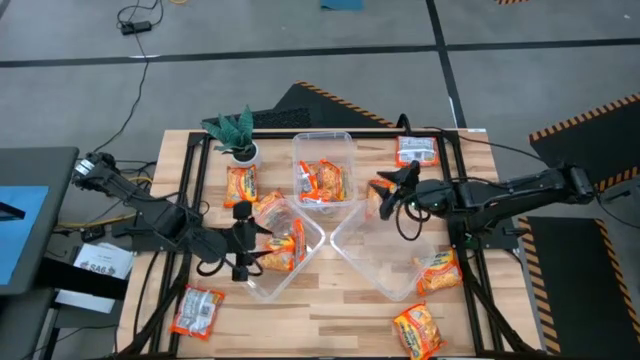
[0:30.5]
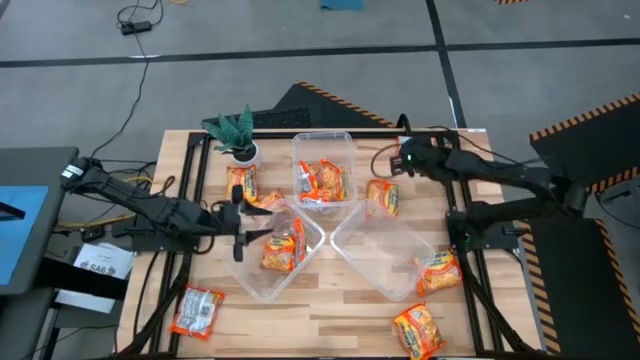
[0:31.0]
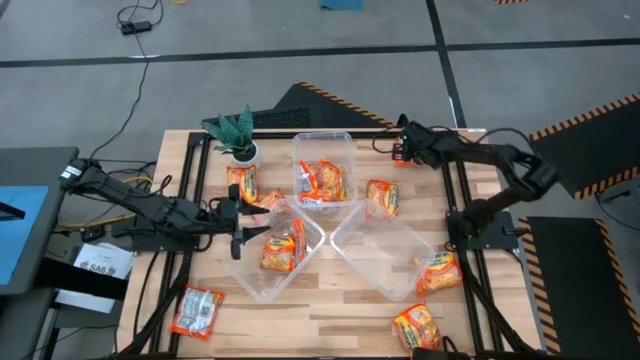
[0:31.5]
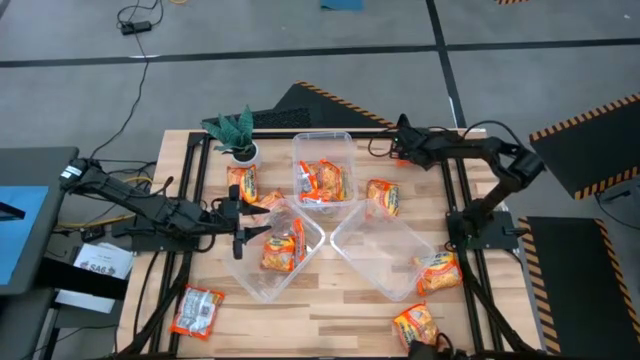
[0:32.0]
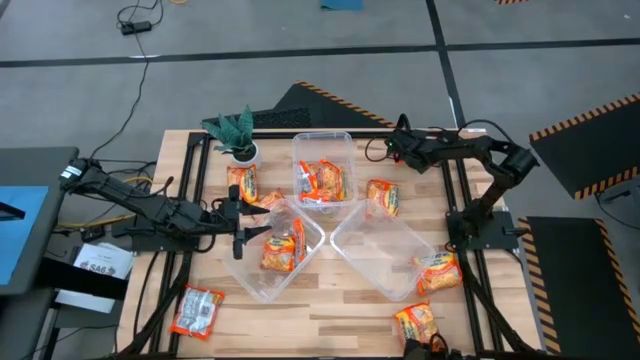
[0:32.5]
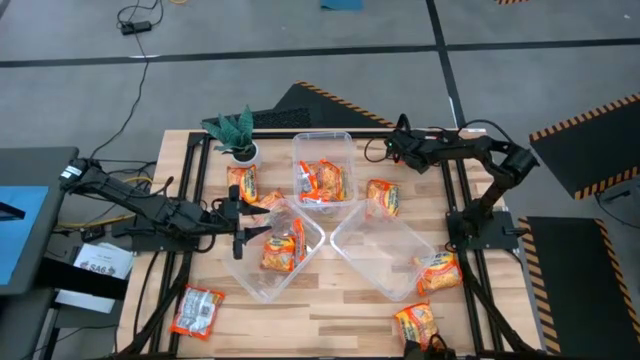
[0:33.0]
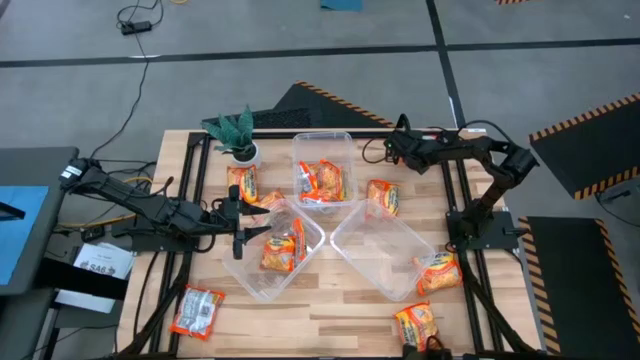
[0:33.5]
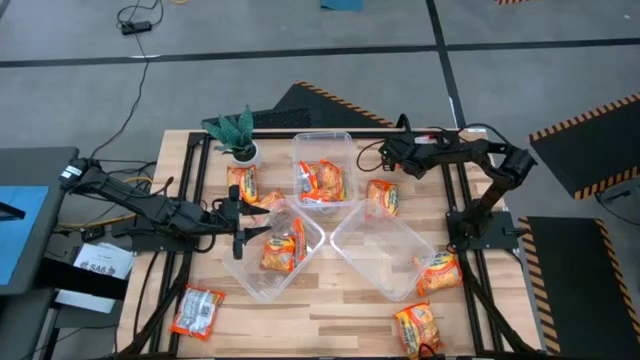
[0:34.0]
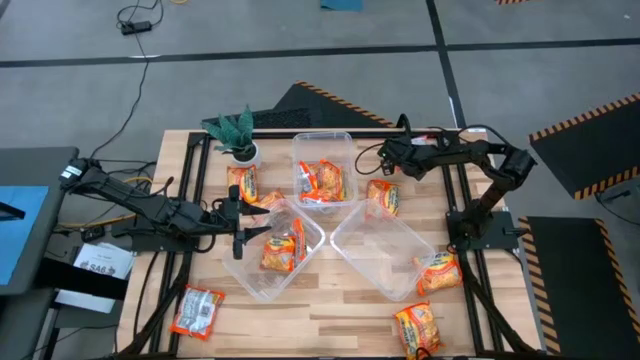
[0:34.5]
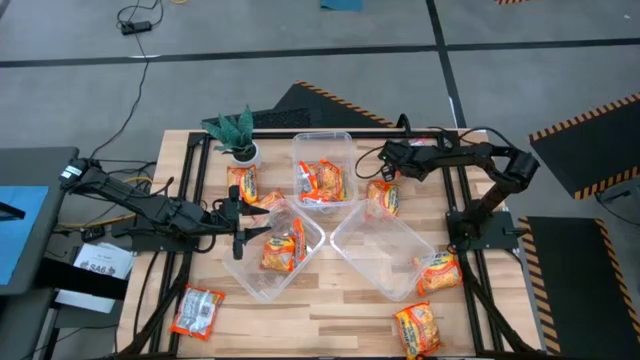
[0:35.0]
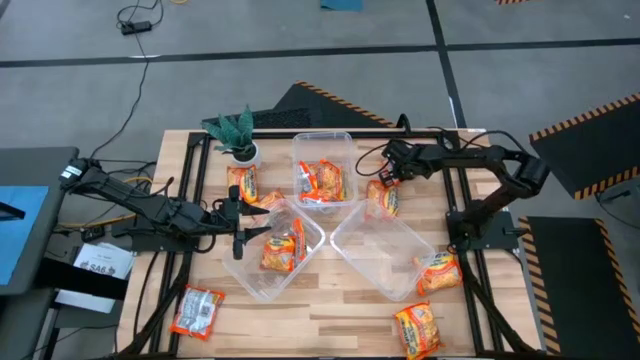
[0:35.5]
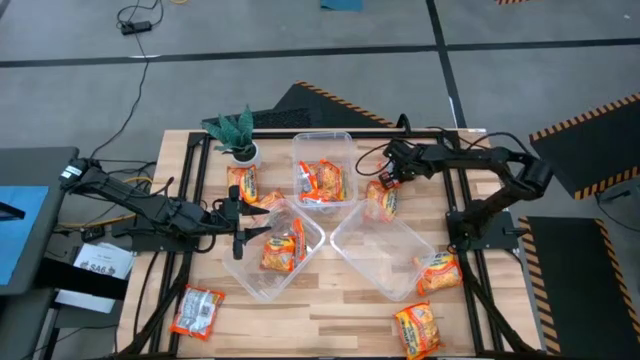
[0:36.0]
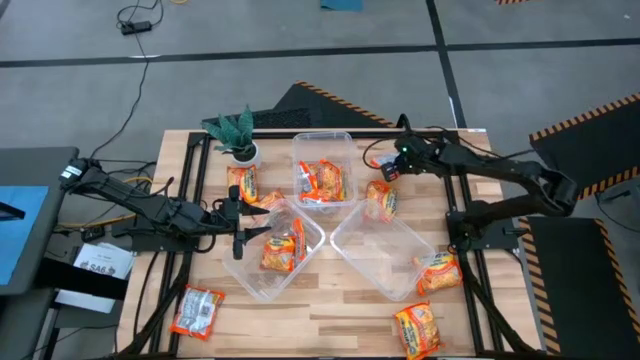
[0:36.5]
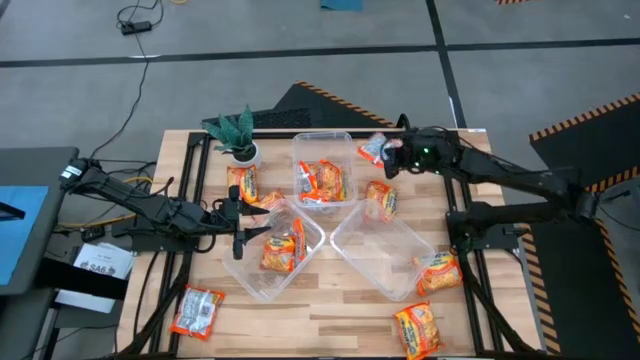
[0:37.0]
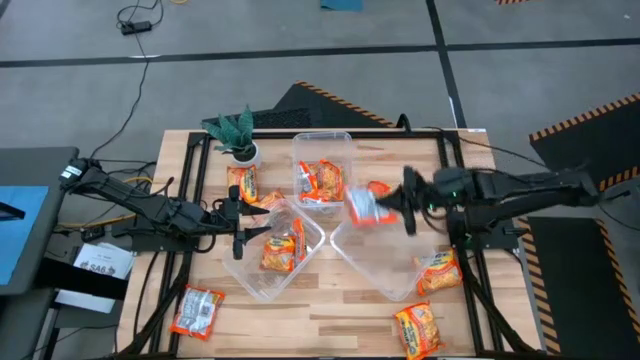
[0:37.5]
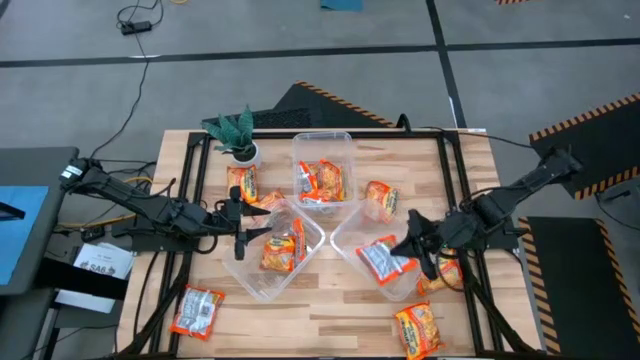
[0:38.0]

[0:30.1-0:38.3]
Task: Sort Maruchan noodles
Put the orange noodle pack into the bottom right transparent container

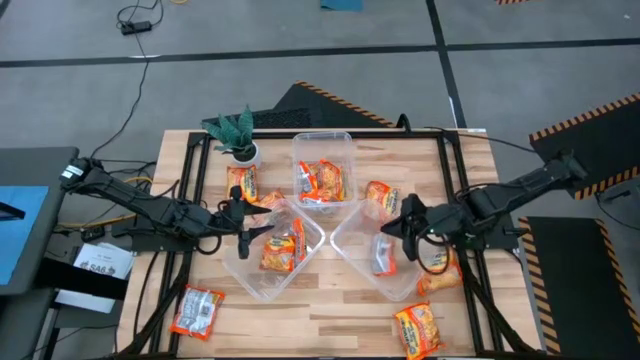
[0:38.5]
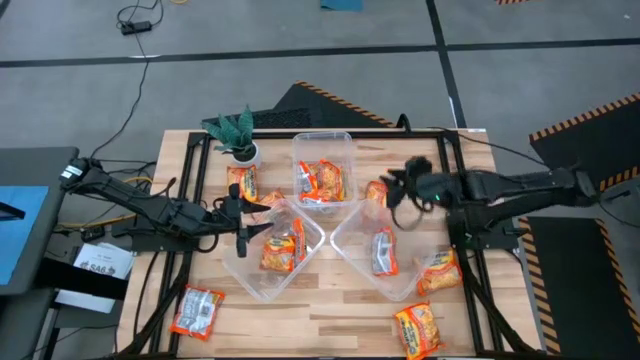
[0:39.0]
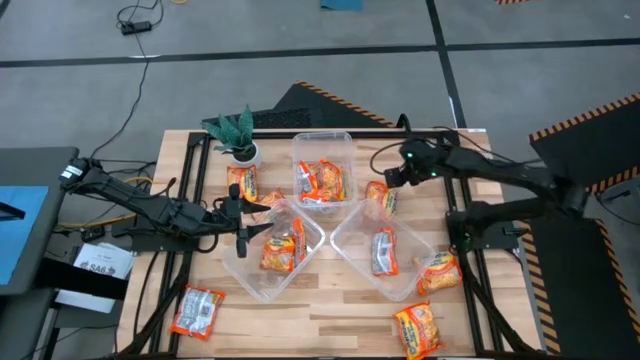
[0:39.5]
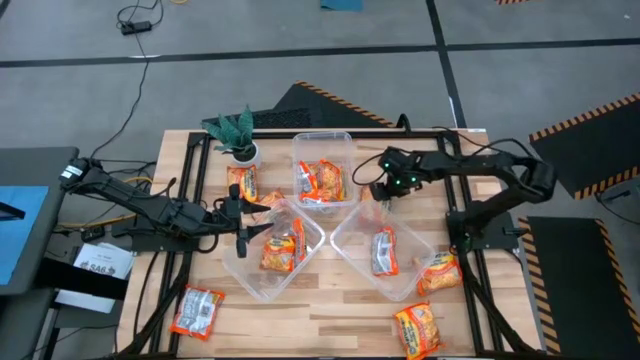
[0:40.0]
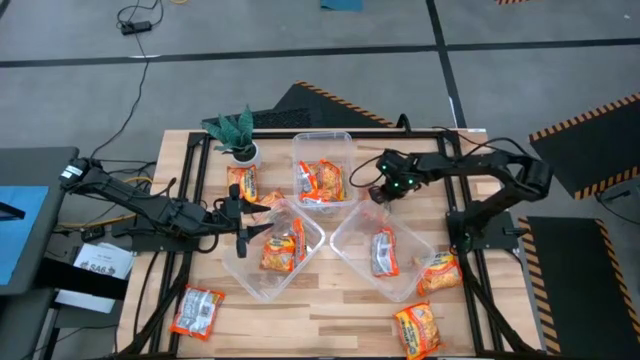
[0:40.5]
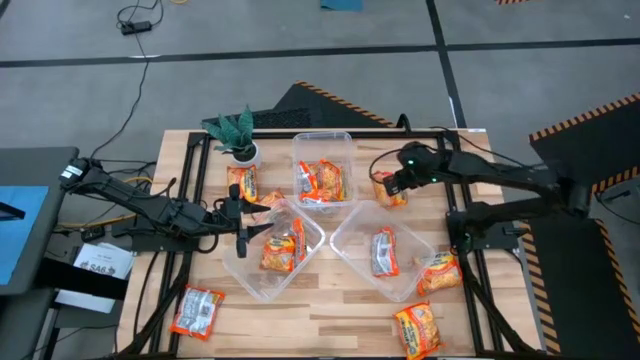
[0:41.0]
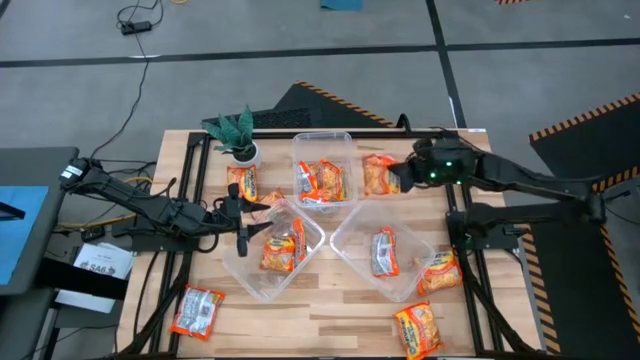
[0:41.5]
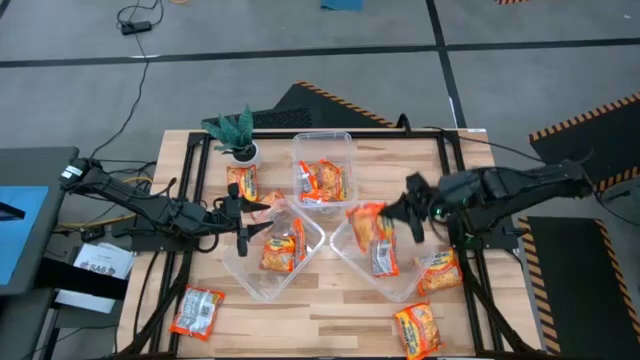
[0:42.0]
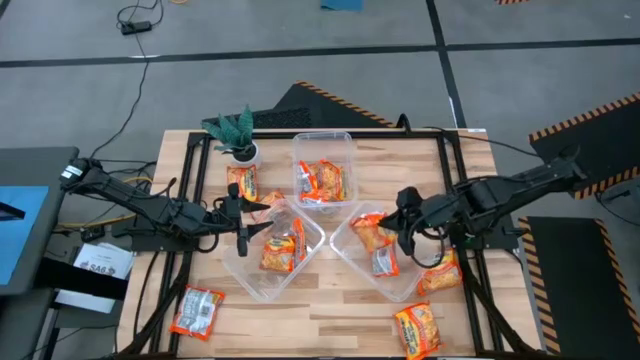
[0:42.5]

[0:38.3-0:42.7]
Put the orange noodle pack into the bottom right transparent container

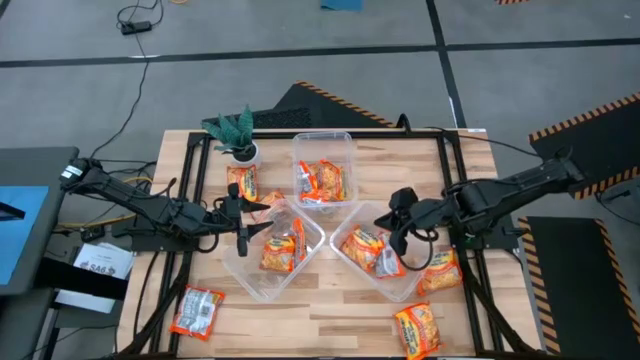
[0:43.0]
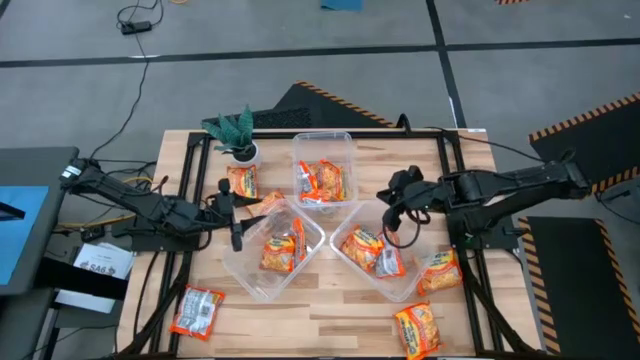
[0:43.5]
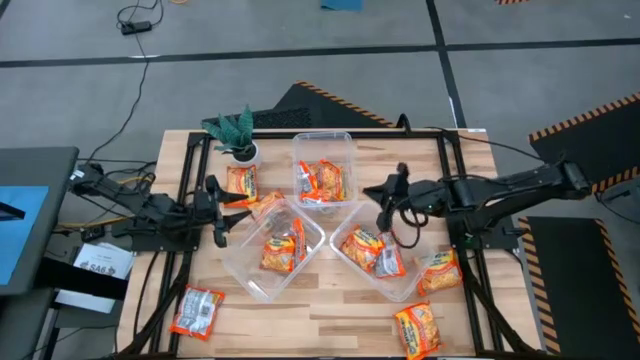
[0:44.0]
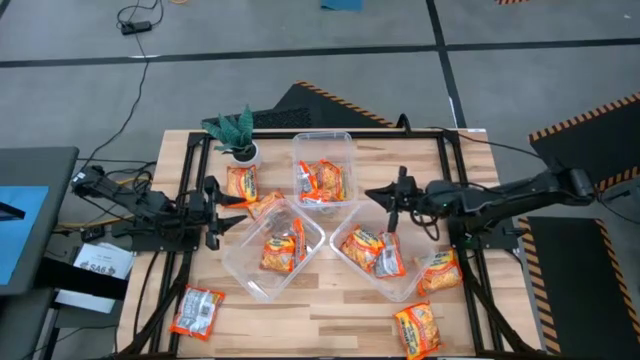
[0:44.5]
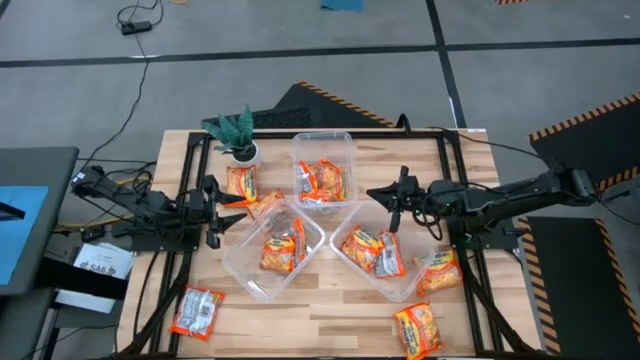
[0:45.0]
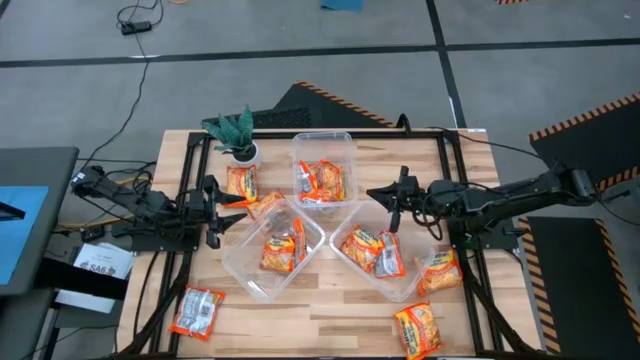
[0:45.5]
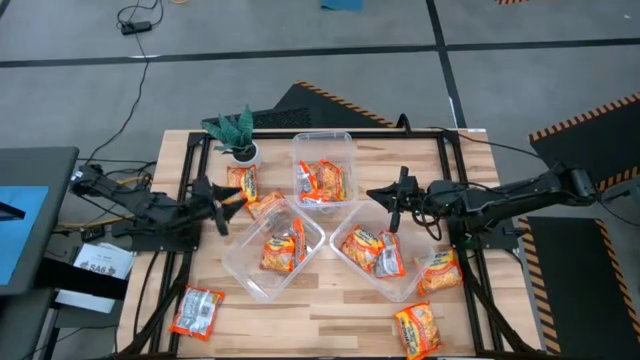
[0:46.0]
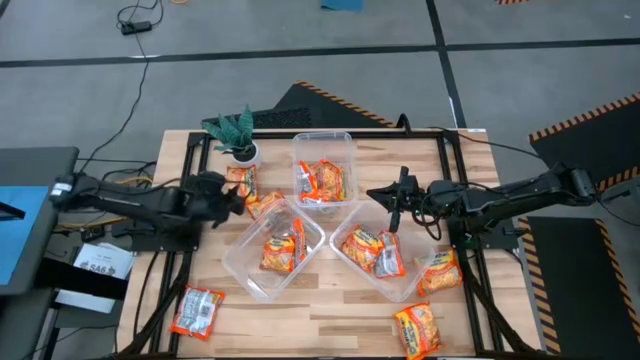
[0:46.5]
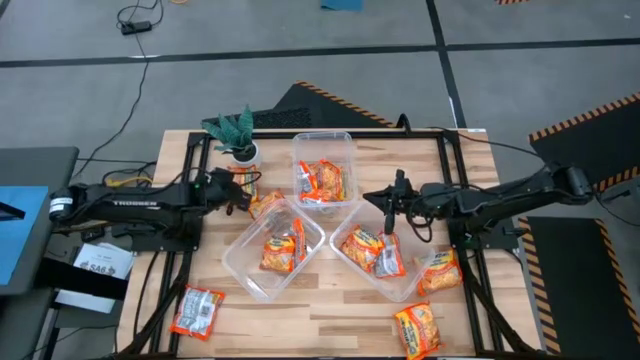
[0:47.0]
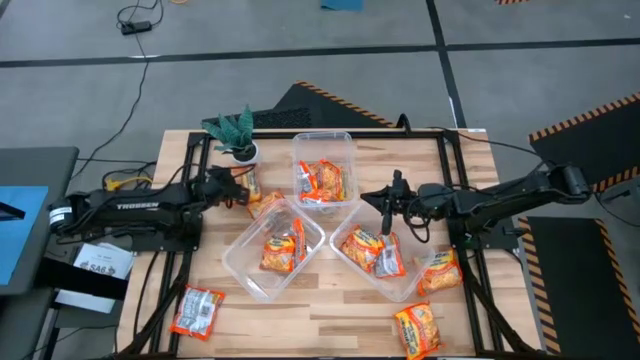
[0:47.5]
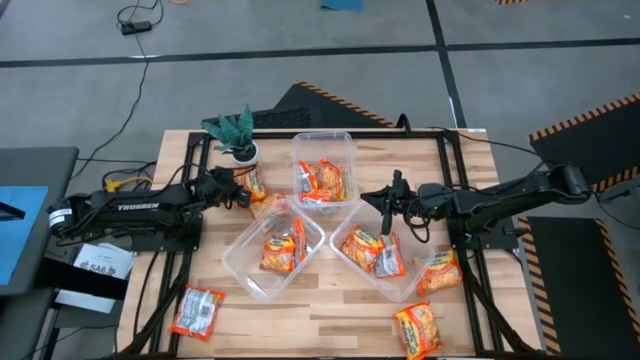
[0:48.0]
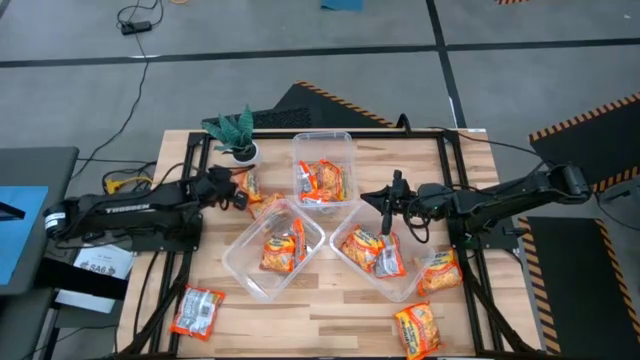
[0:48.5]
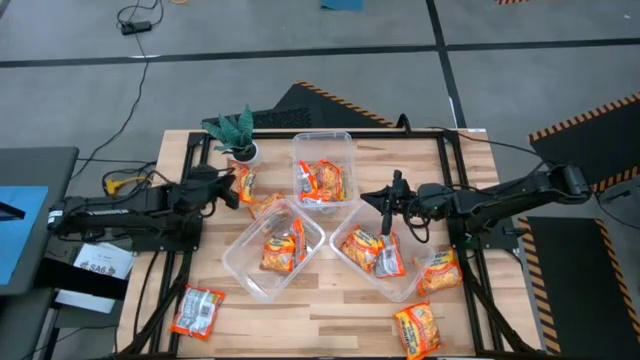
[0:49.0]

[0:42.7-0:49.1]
Put the orange noodle pack into the bottom left transparent container

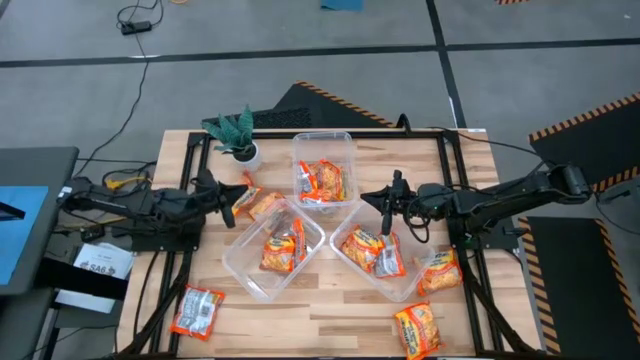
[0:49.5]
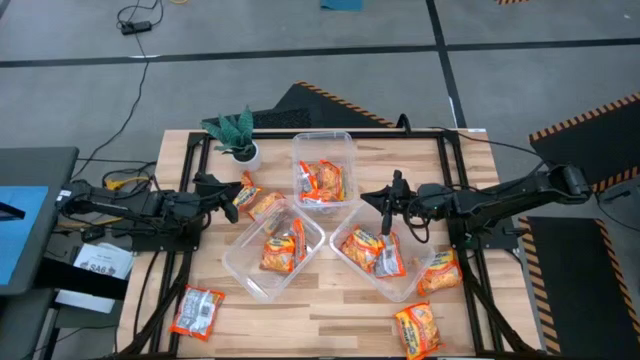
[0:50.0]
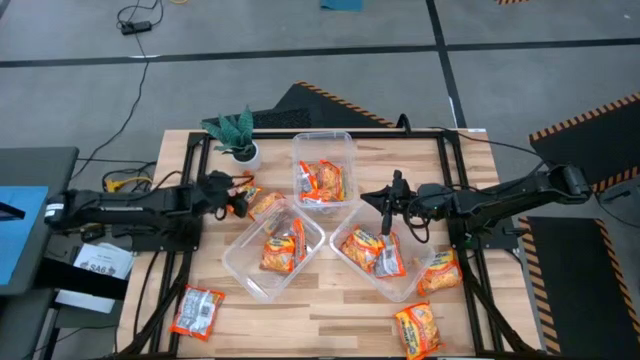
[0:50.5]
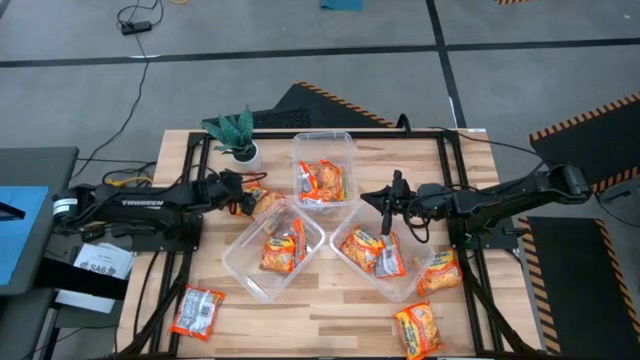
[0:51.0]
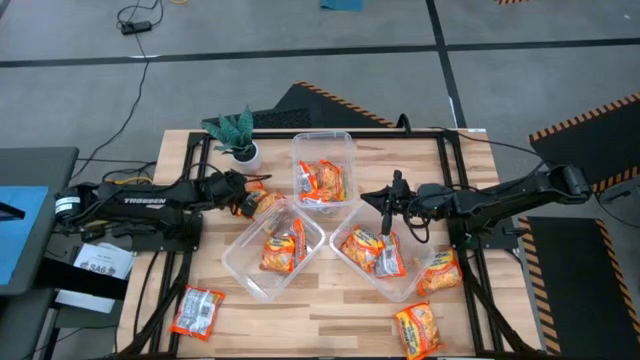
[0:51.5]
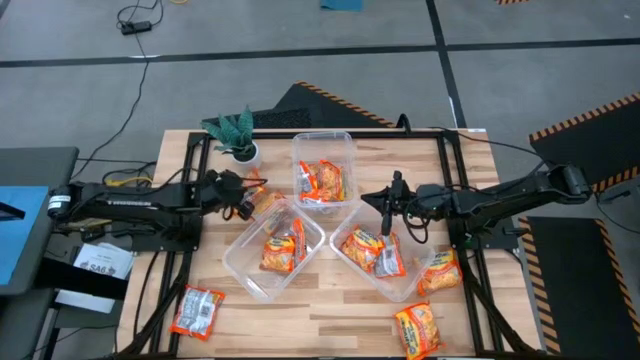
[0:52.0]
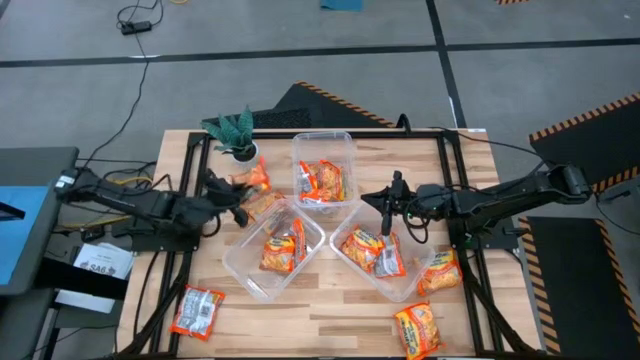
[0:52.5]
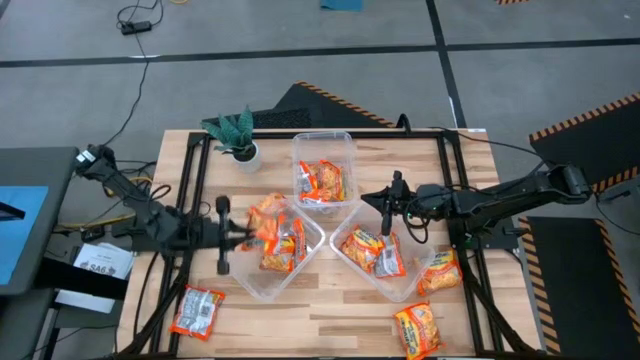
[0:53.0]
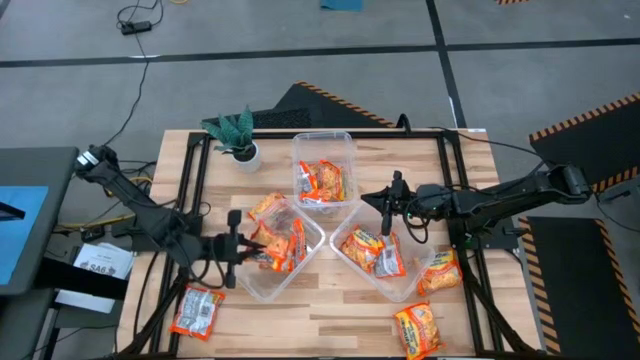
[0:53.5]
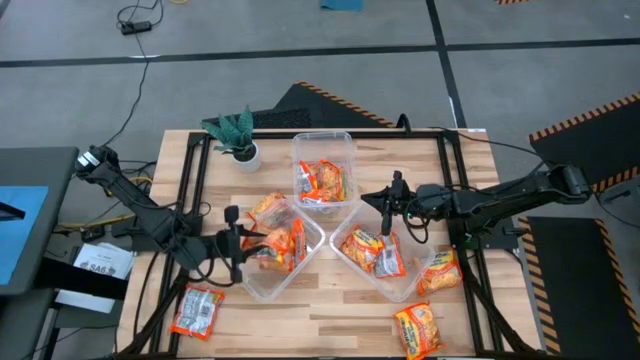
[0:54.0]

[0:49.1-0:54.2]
Put the orange noodle pack into the bottom left transparent container
